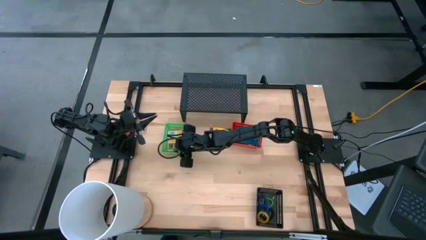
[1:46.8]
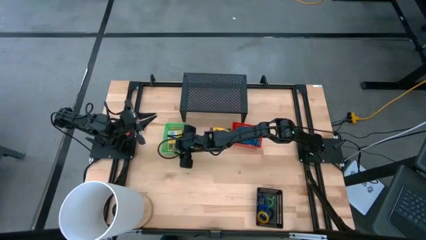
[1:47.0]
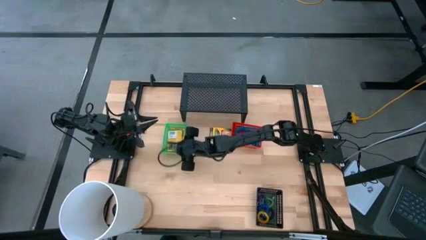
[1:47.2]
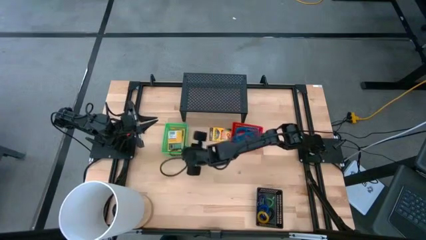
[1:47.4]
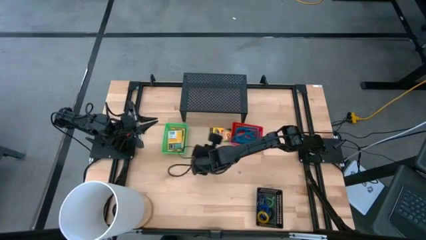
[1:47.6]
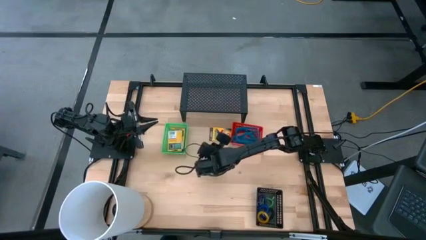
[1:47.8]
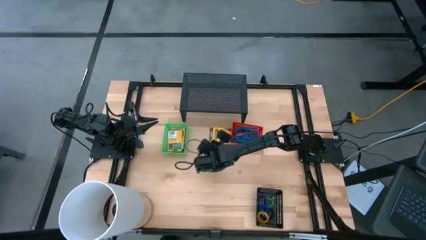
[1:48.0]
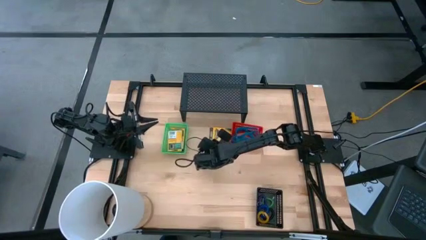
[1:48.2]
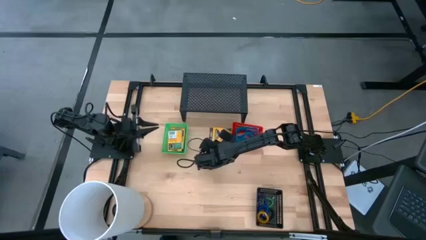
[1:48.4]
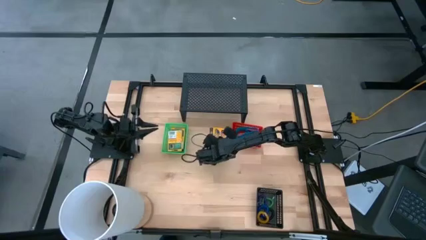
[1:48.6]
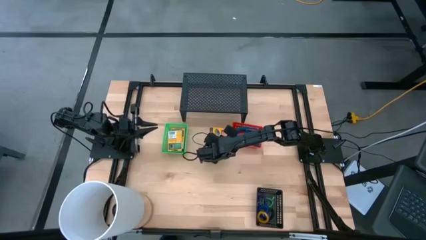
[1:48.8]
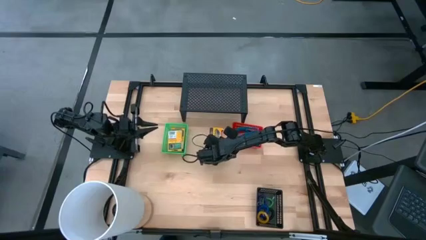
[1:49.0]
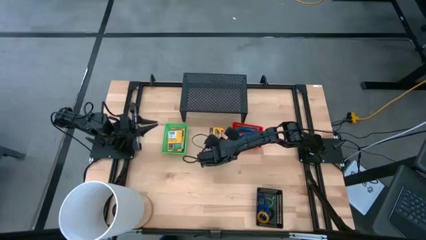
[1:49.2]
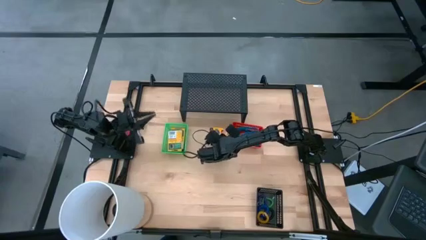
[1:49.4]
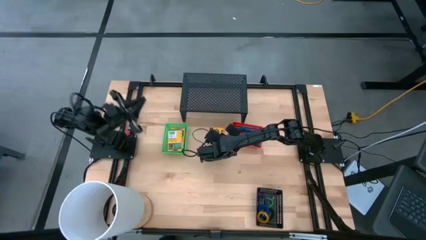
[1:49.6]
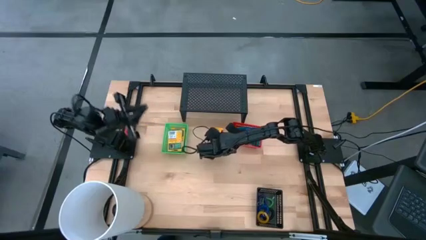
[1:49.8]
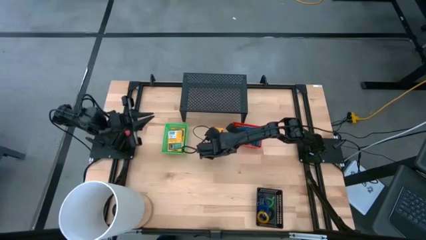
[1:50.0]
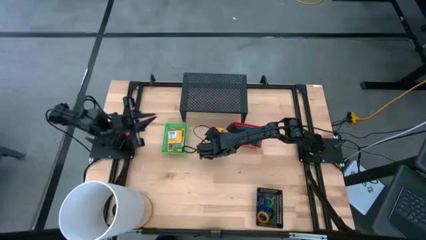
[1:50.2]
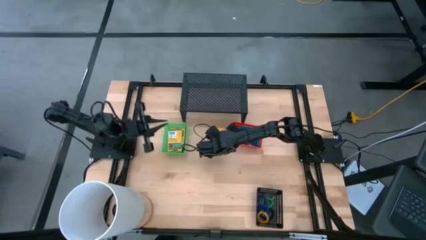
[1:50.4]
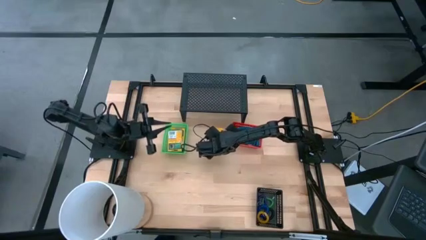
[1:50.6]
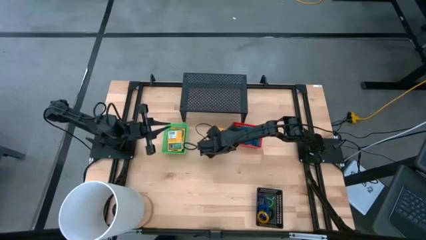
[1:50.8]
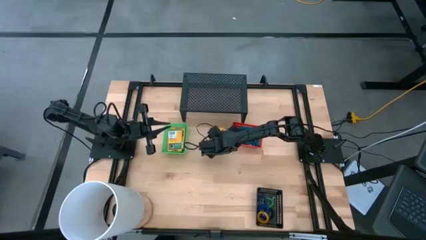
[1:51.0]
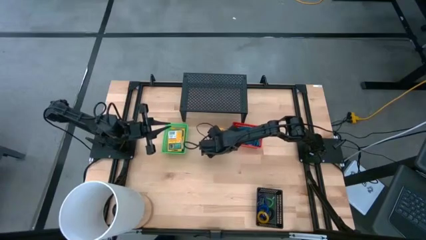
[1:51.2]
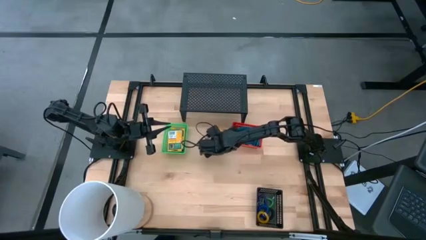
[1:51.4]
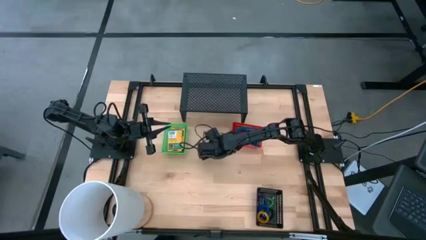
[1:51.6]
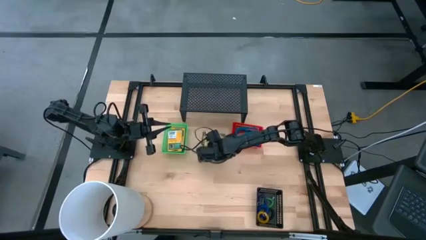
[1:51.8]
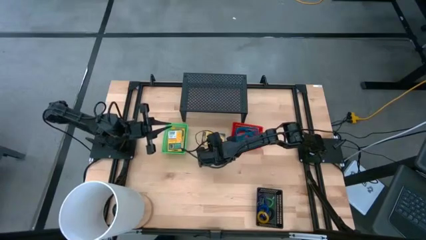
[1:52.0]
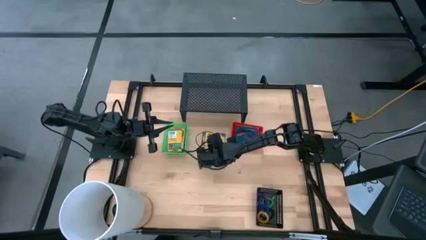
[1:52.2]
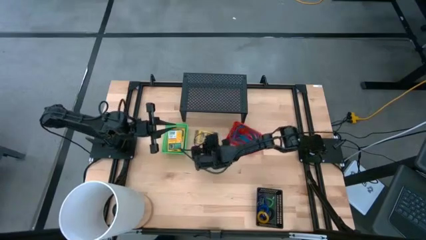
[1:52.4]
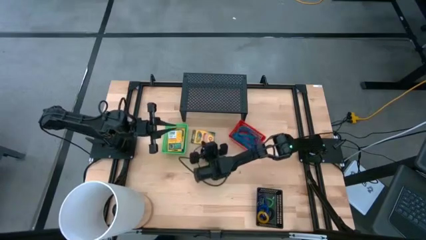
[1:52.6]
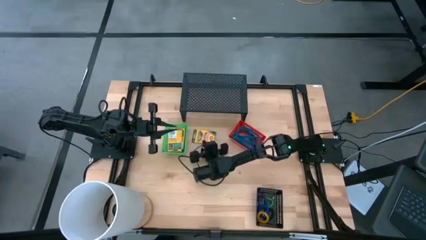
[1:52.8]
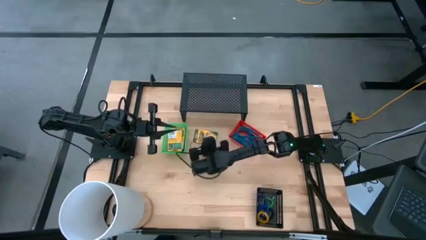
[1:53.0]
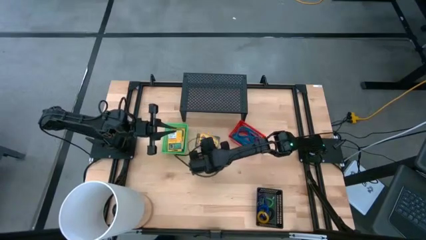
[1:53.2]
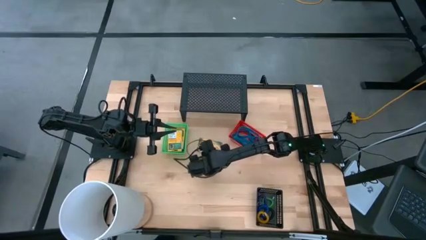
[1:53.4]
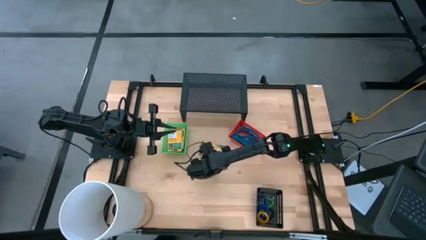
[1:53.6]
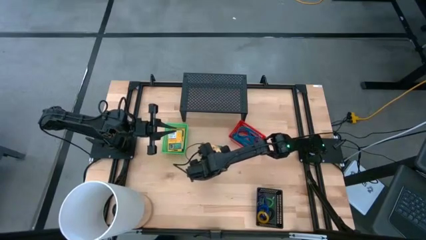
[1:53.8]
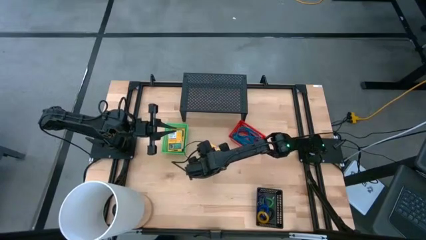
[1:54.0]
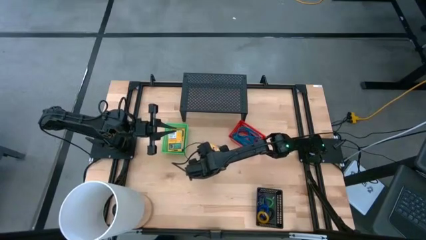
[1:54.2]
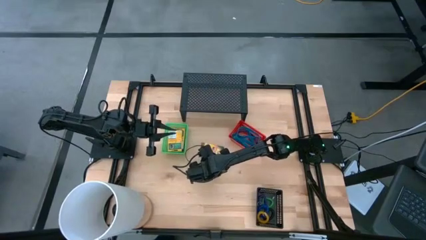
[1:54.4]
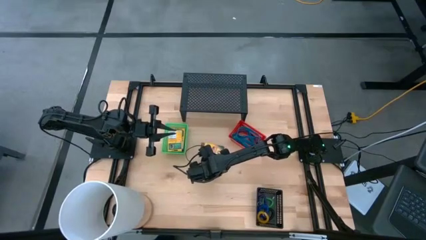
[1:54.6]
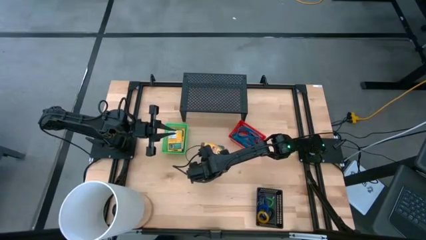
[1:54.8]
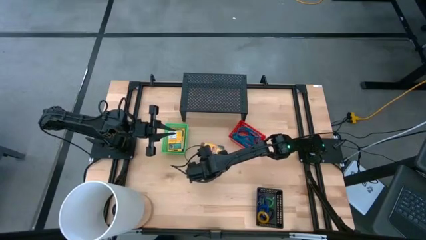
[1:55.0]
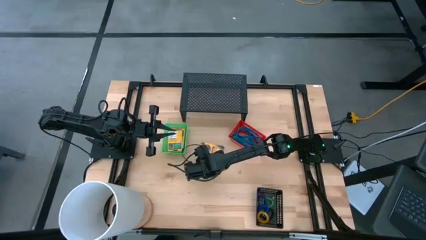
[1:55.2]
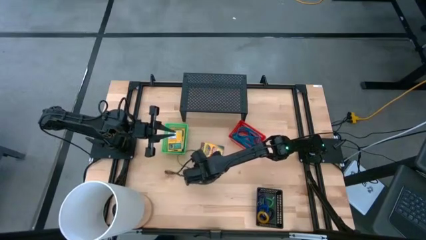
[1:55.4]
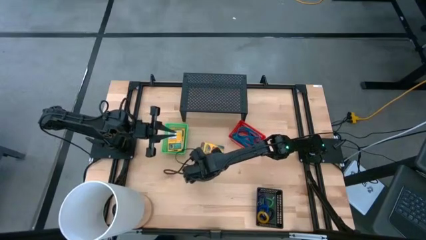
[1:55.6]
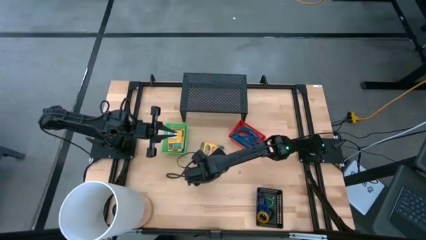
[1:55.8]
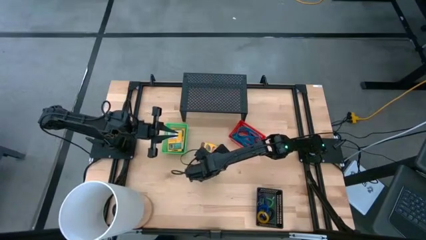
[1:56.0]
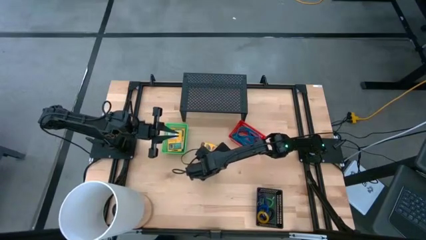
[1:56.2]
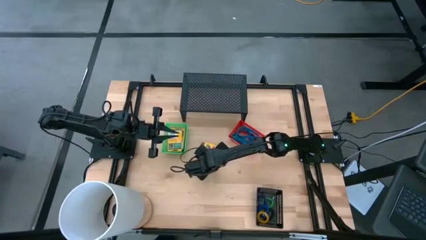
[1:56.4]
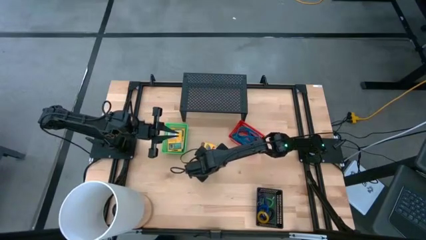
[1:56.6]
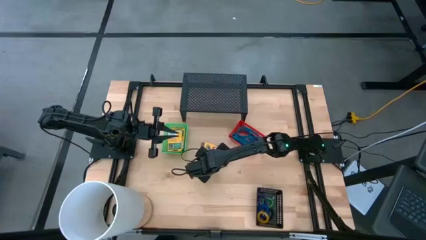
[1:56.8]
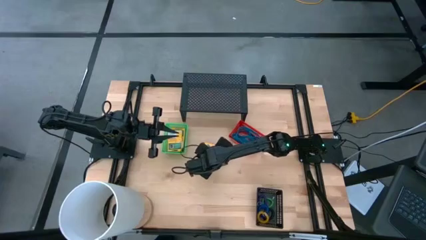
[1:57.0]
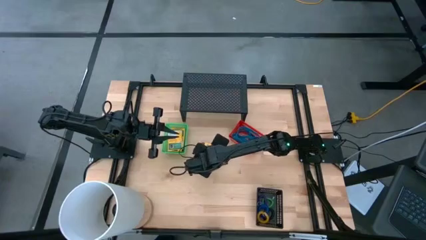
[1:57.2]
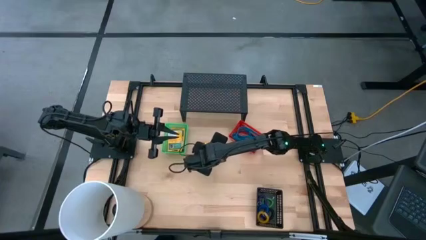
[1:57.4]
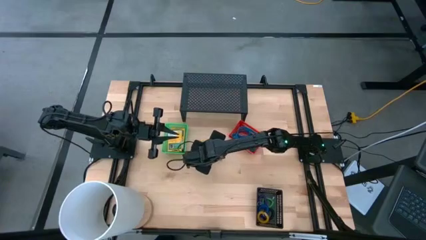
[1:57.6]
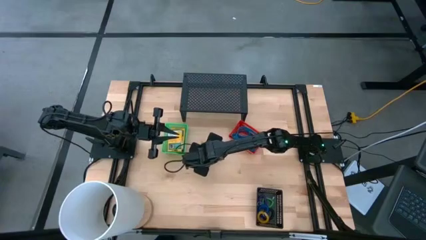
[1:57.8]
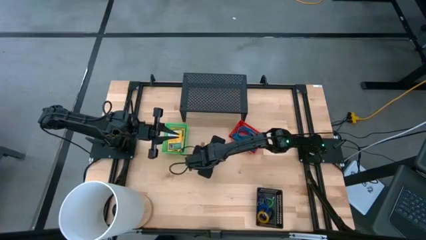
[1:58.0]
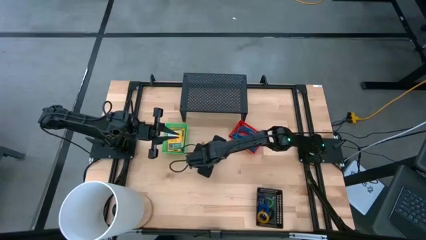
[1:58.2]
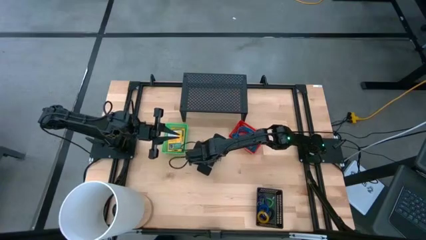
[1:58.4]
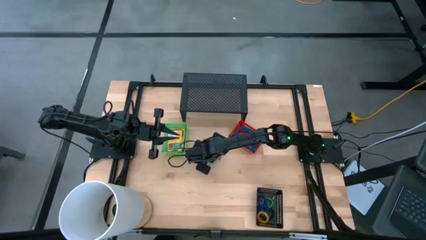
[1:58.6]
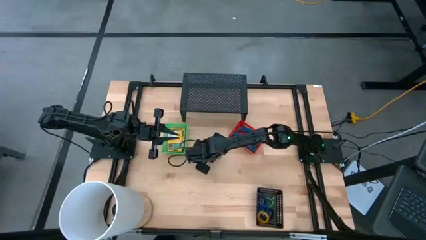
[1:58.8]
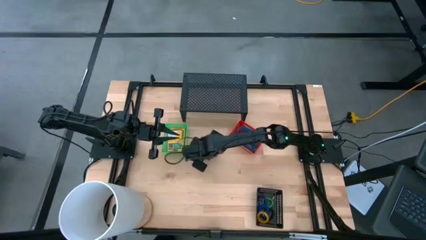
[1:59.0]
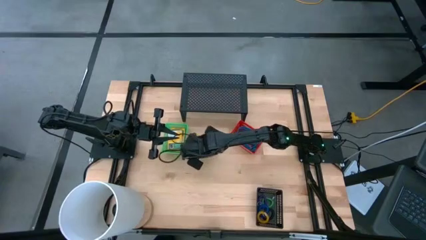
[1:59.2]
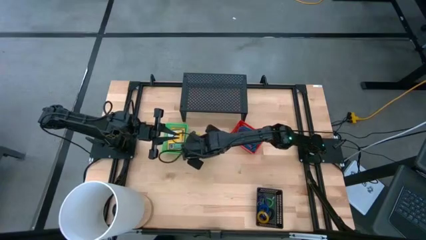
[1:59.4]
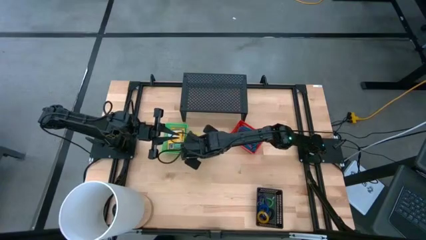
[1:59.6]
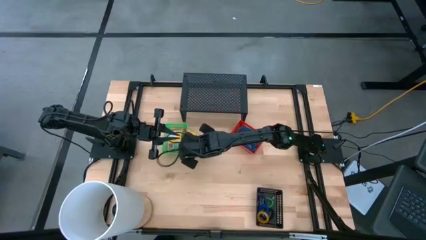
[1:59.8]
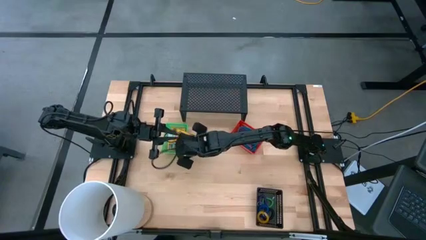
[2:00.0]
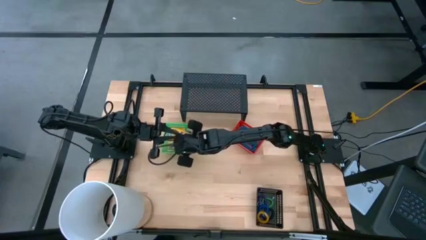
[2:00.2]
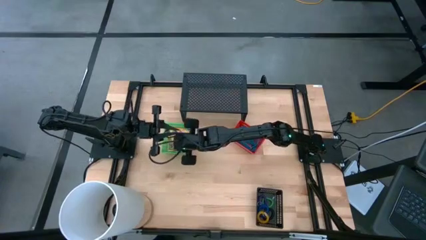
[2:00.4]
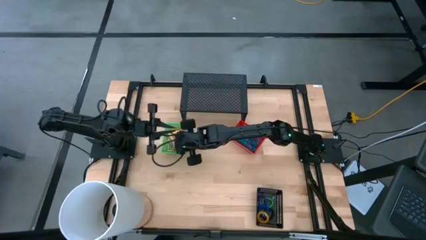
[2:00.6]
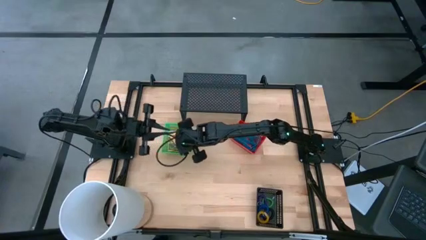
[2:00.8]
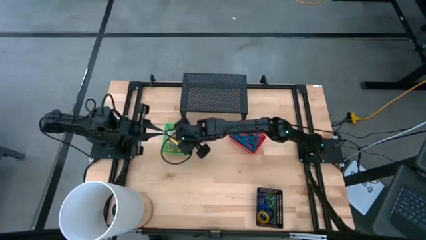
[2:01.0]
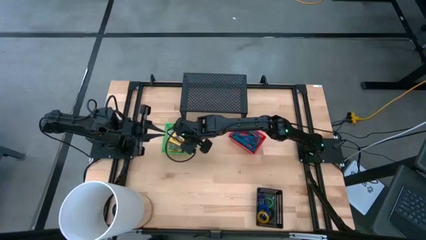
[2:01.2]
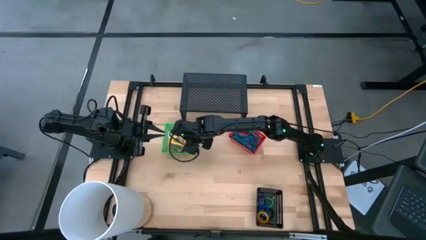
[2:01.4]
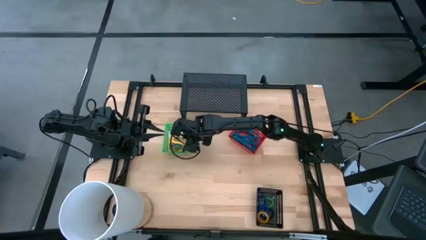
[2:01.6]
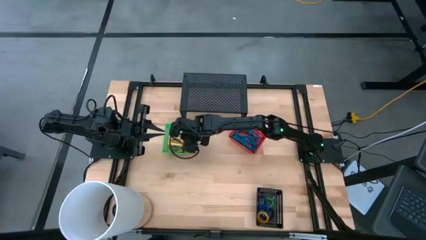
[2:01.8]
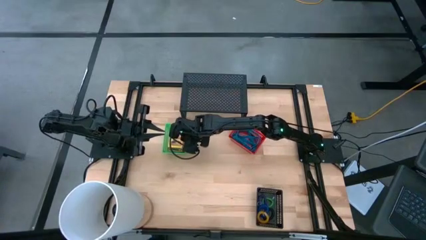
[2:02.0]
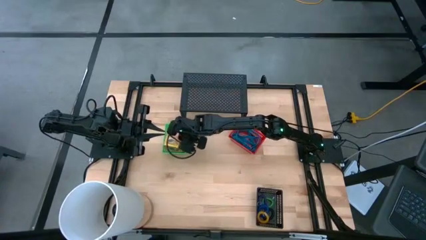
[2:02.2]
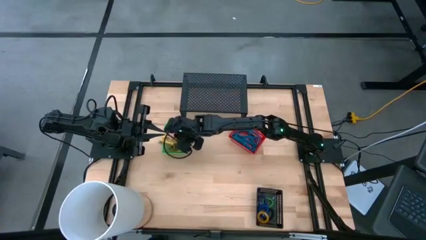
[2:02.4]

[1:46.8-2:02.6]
Task: Pick & Place Office Desk Supplies
Put the box of crayon into the black bin
